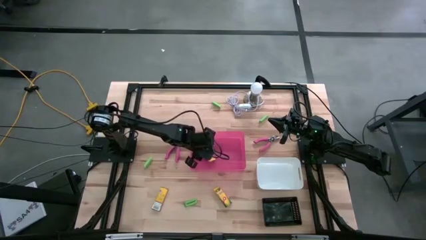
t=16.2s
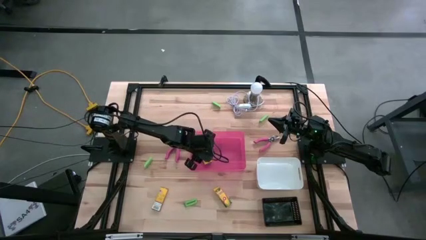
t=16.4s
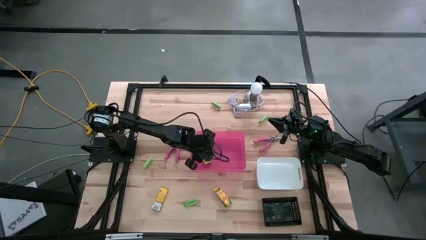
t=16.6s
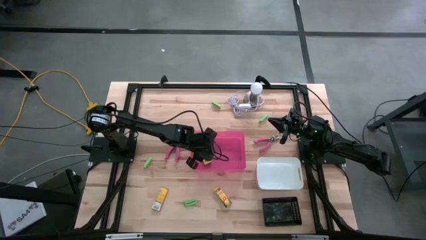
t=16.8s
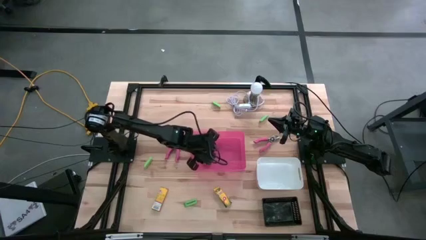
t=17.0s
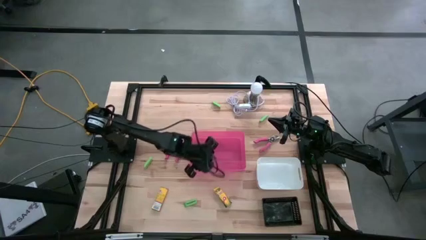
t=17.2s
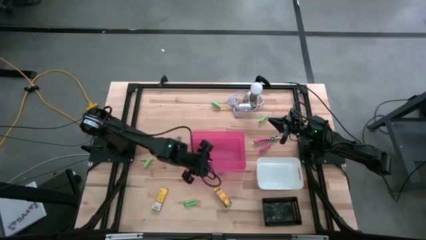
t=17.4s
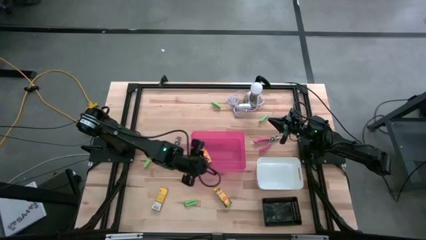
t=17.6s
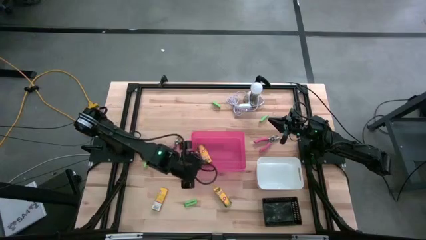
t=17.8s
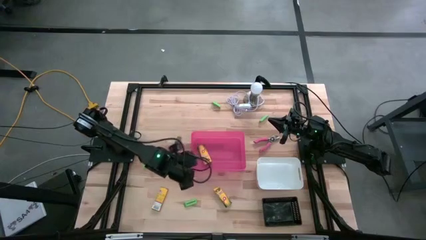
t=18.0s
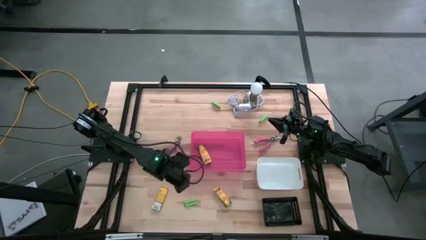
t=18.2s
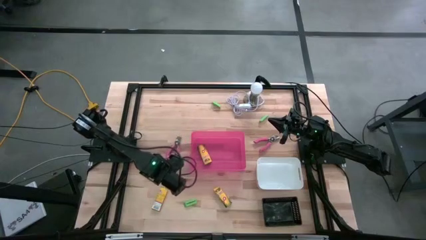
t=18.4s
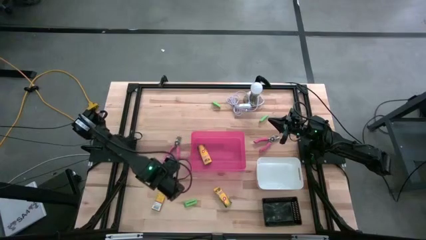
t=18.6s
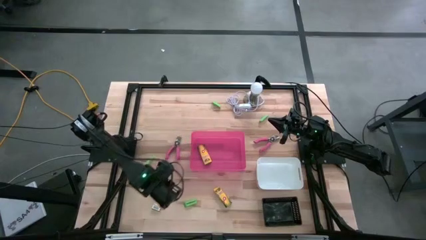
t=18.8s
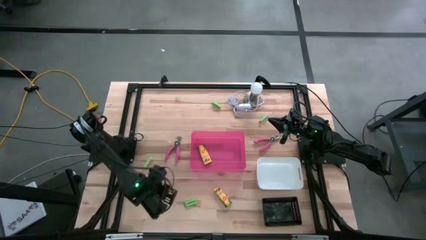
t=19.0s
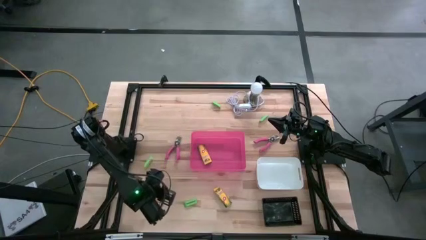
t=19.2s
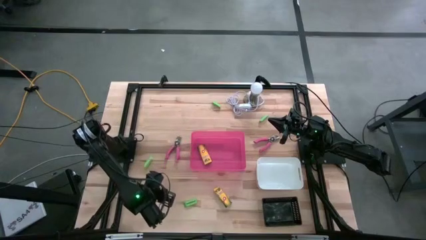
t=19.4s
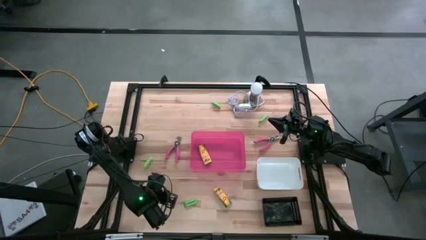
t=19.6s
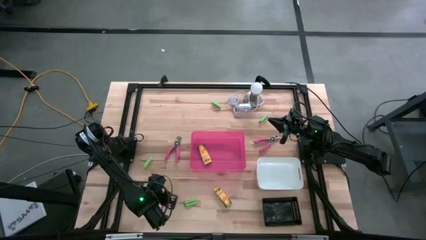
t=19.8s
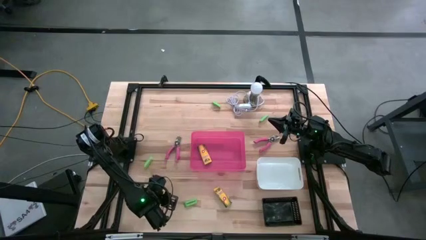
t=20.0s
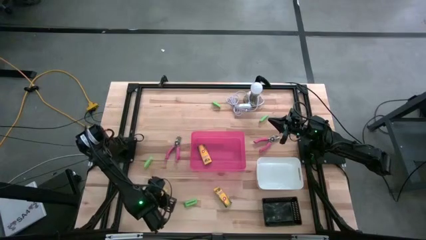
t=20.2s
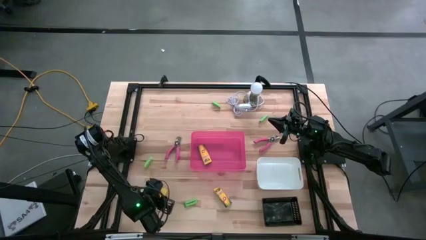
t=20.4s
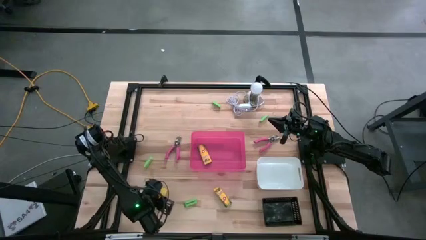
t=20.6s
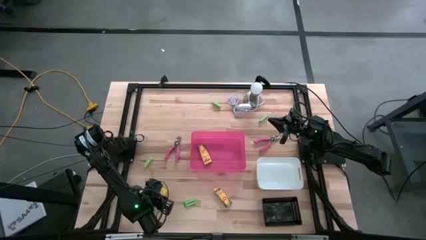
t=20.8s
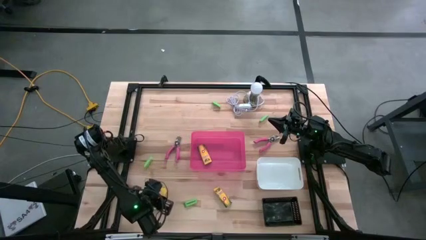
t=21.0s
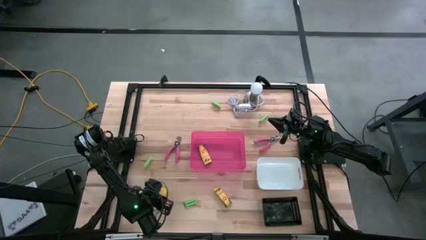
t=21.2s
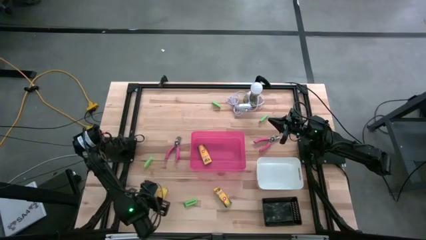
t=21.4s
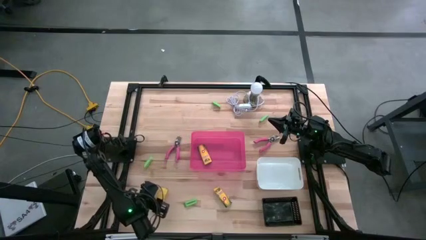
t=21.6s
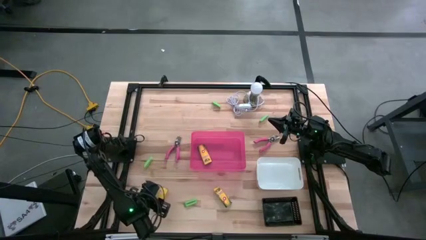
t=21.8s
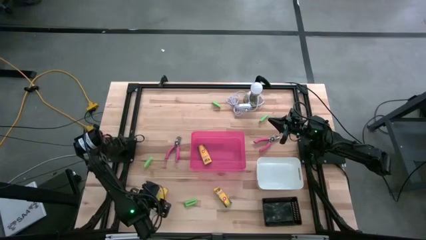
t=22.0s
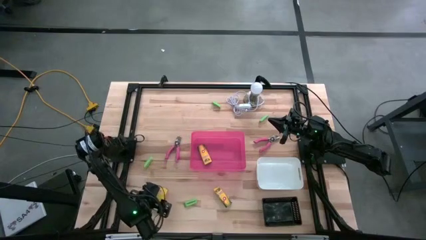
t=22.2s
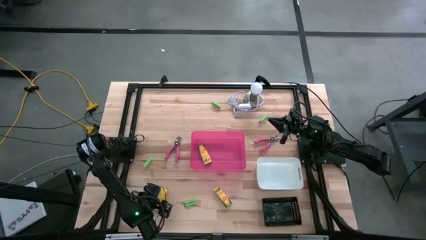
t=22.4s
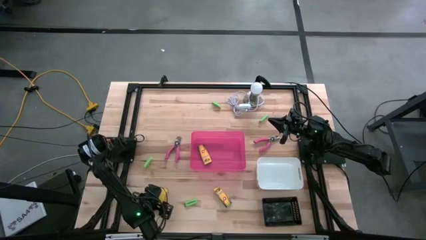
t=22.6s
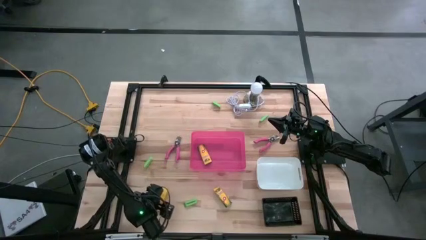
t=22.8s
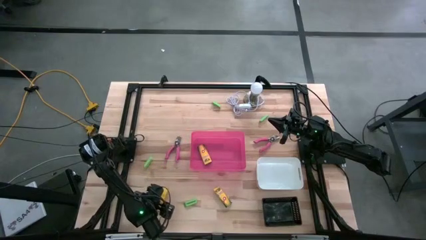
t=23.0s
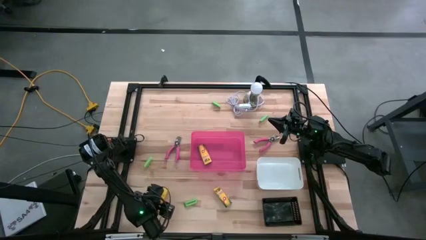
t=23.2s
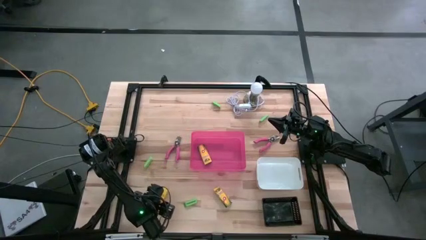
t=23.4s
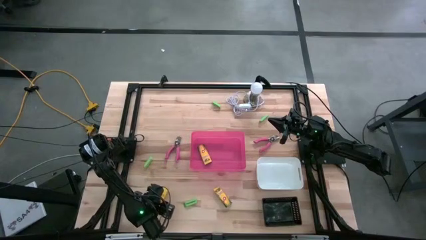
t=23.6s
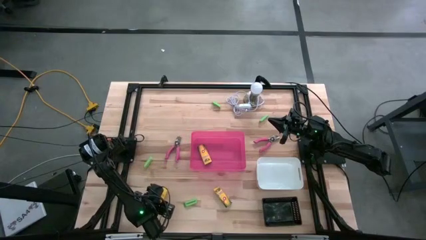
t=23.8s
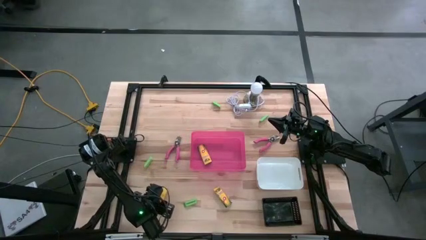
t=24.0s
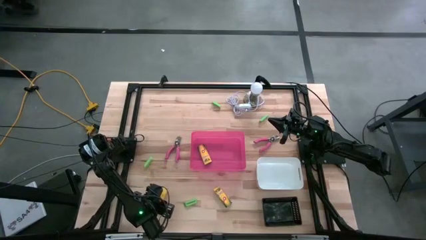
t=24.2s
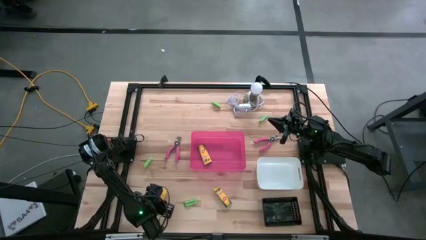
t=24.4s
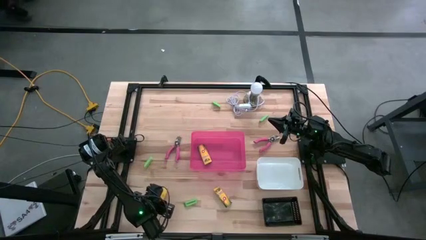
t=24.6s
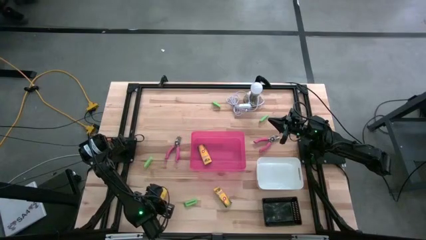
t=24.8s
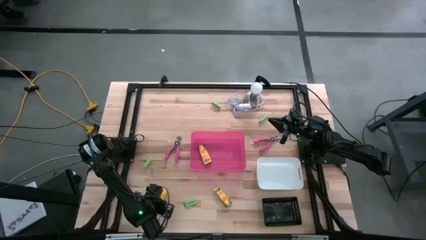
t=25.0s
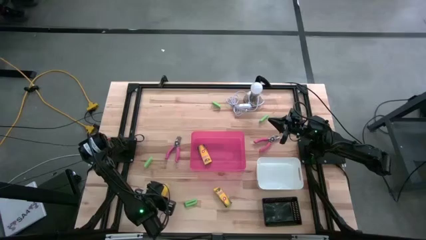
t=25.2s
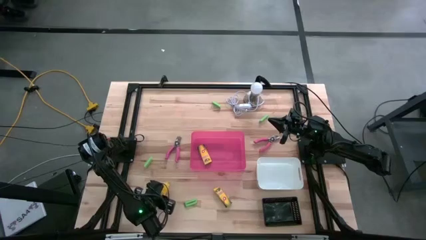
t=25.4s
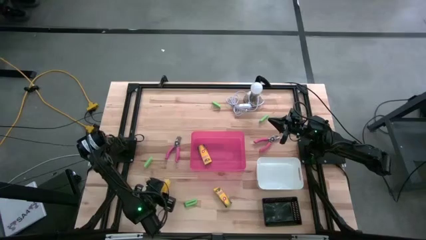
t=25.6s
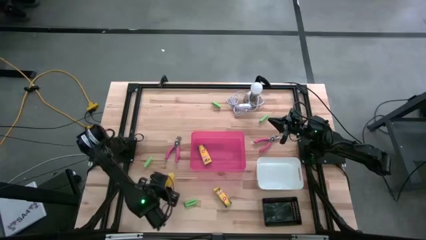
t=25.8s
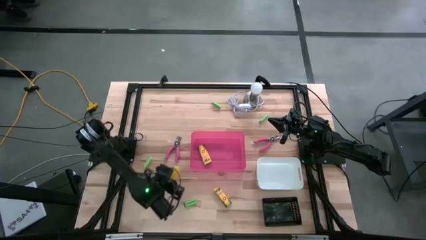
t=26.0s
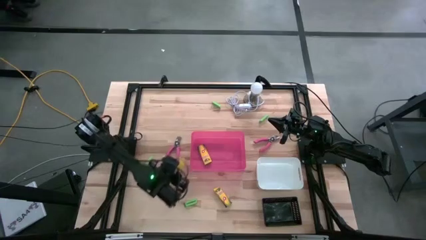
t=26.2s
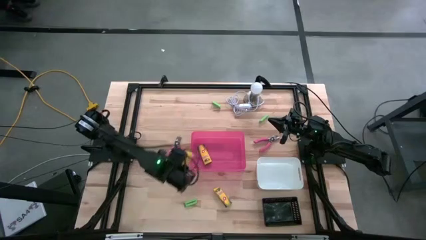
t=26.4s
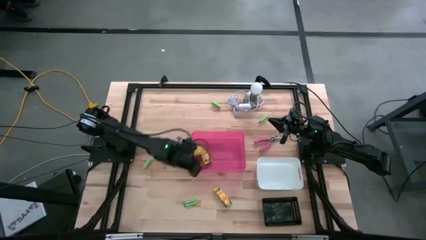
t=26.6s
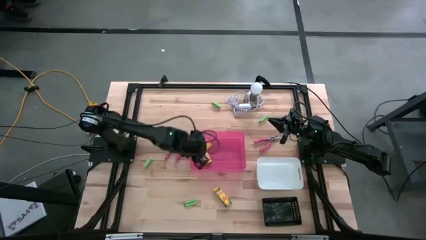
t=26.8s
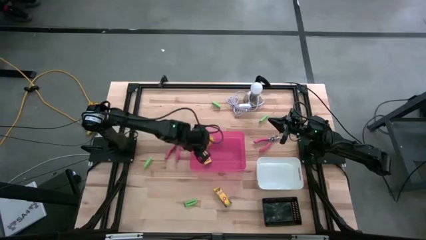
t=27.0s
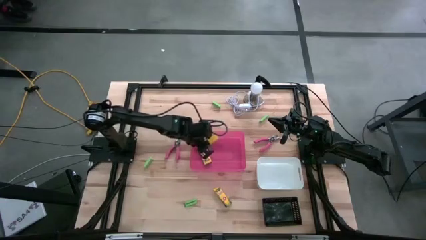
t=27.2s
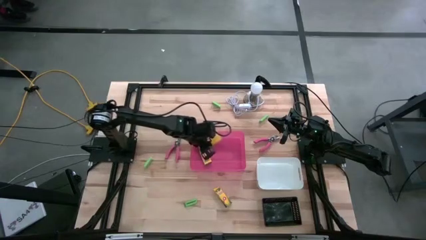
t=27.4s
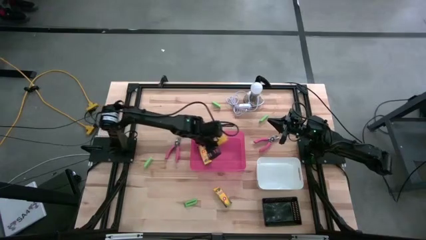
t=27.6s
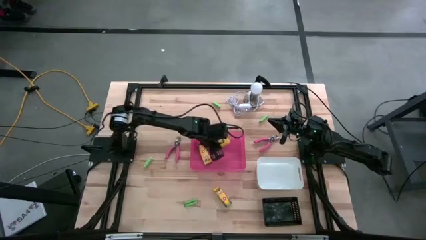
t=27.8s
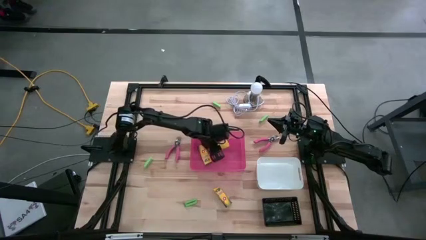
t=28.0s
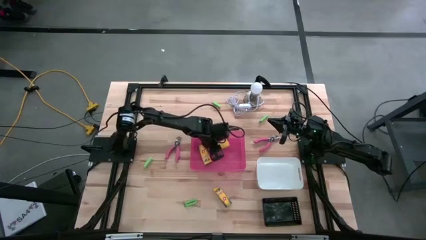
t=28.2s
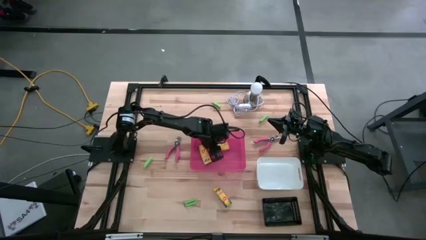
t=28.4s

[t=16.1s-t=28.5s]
Task: Pick & Place School Supplies
Put the yellow crayon box into the pink bin
